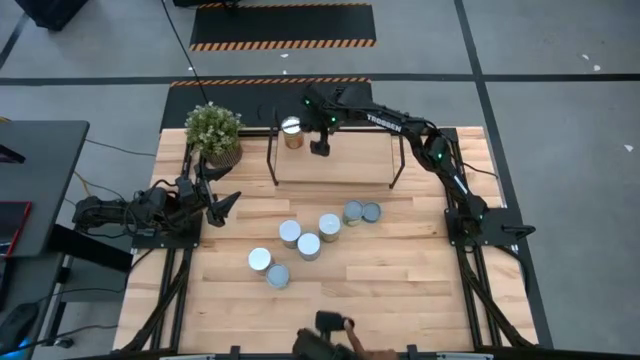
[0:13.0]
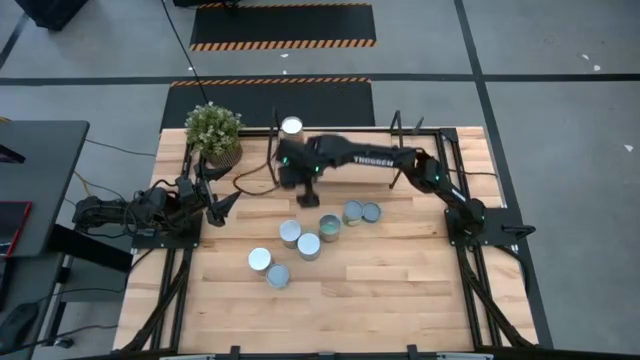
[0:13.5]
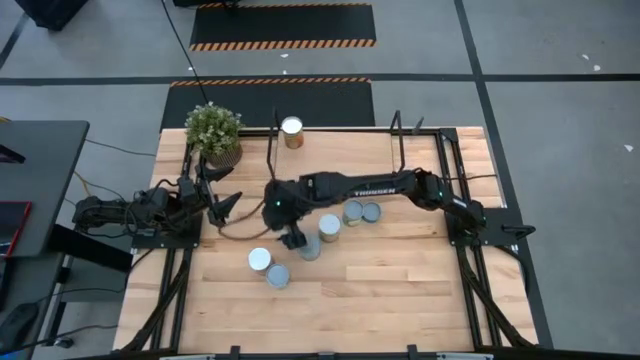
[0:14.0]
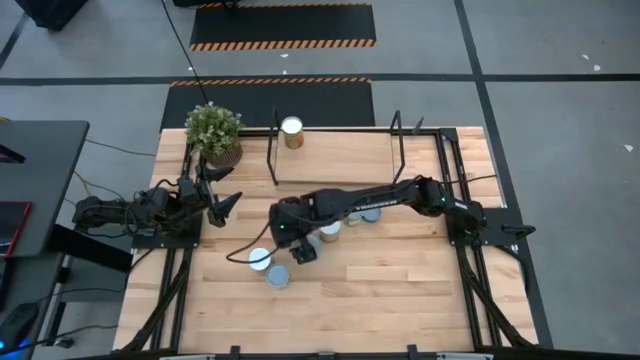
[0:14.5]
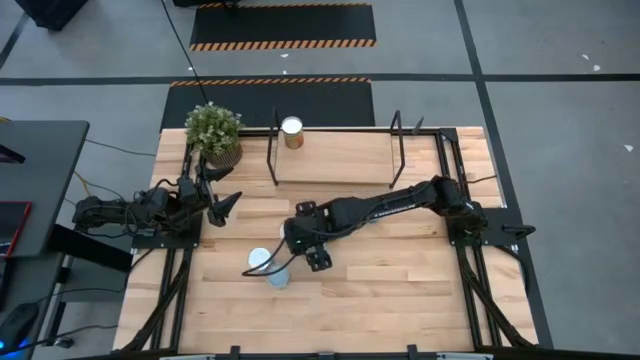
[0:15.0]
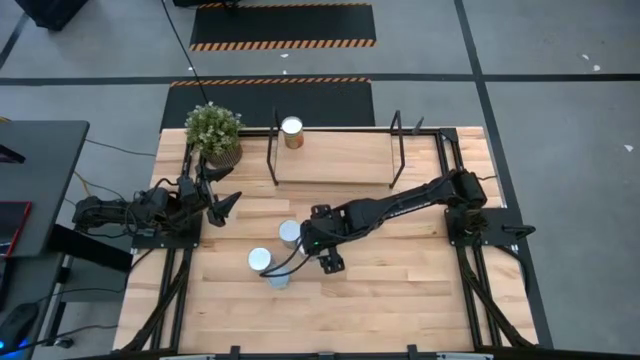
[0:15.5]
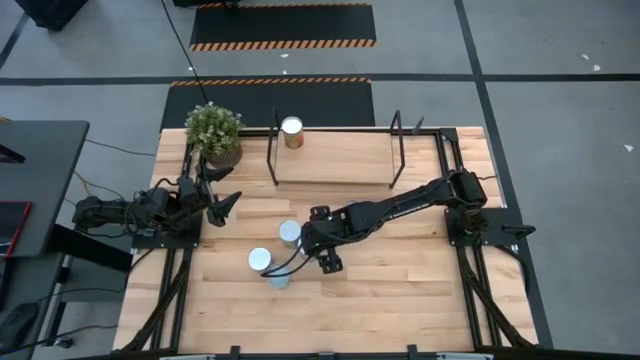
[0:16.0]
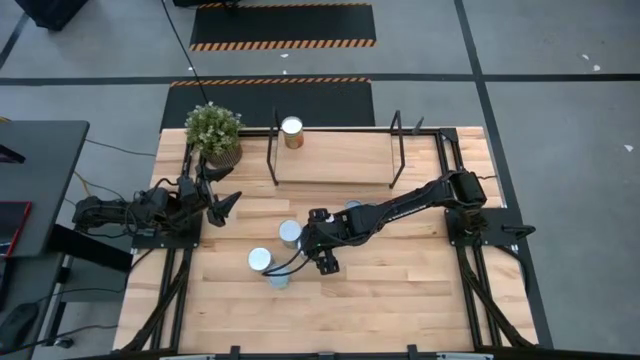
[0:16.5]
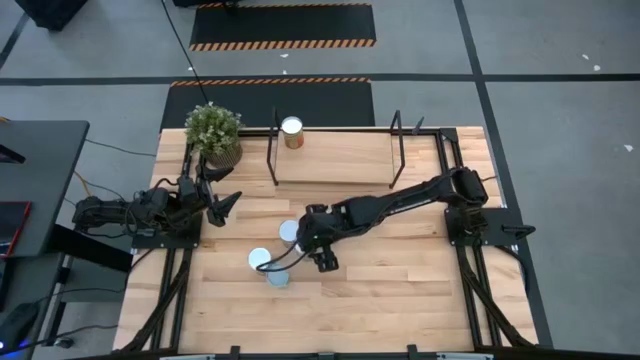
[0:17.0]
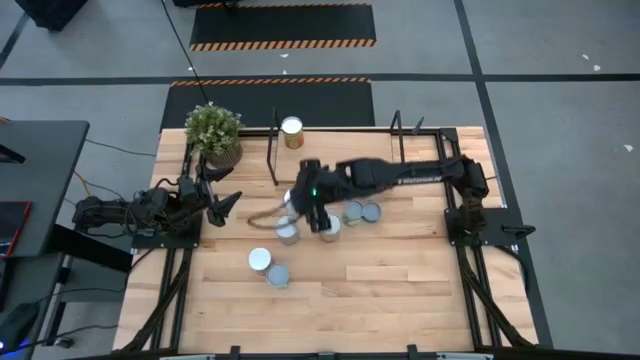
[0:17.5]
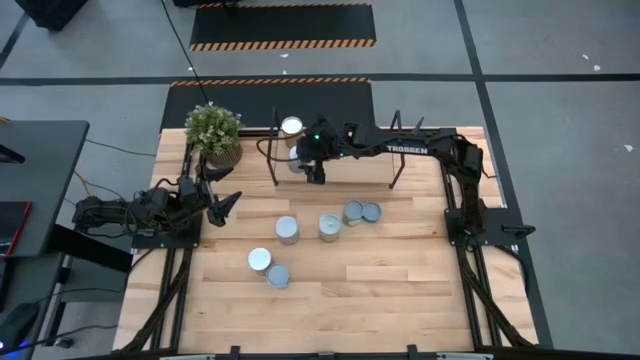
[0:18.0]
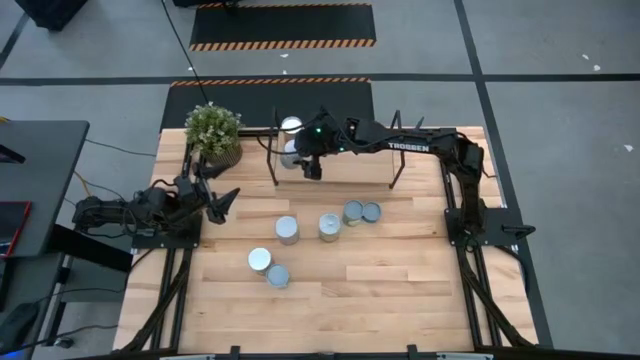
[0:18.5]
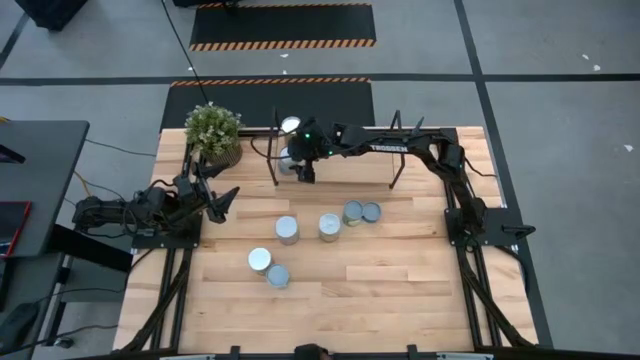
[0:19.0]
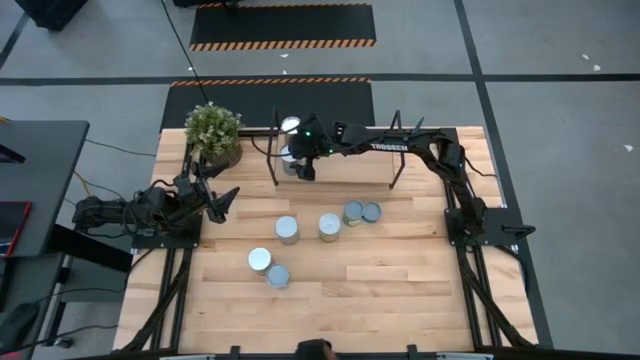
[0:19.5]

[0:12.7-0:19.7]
Task: Pick and place cans onto a shelf
Put the canned cherries on the shelf

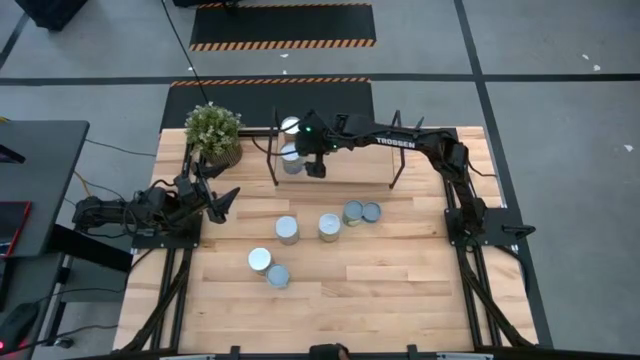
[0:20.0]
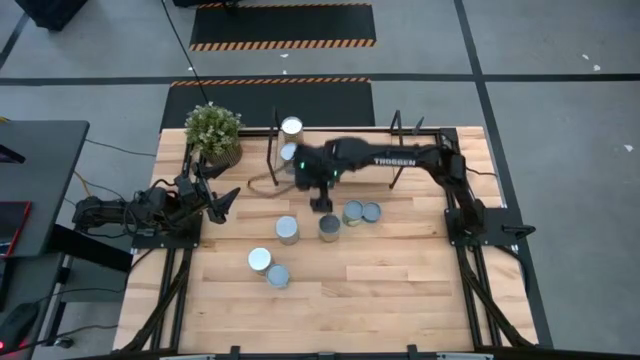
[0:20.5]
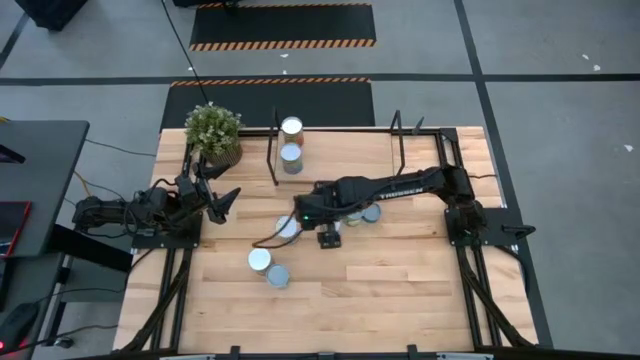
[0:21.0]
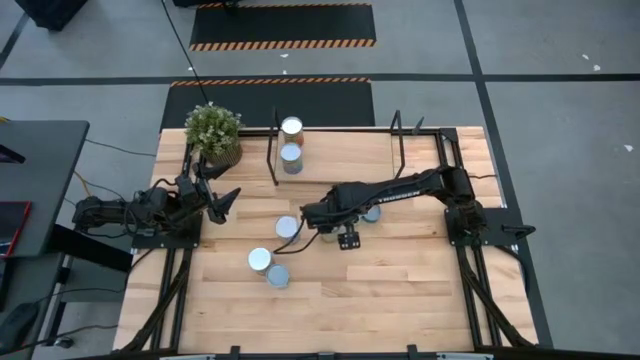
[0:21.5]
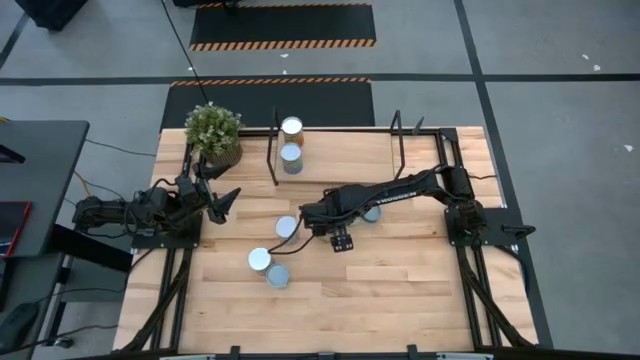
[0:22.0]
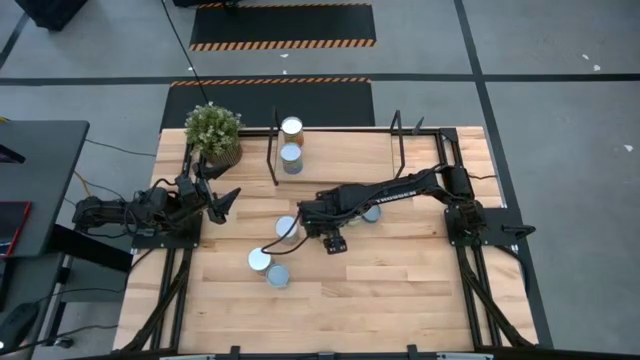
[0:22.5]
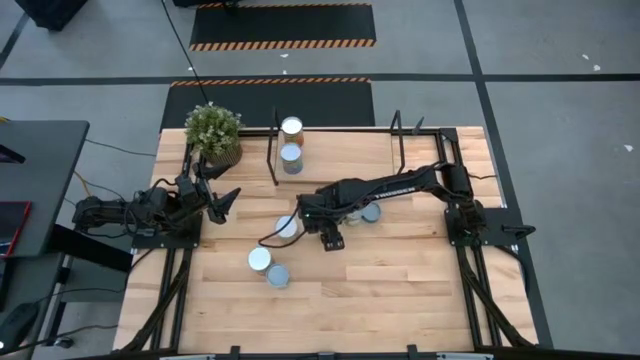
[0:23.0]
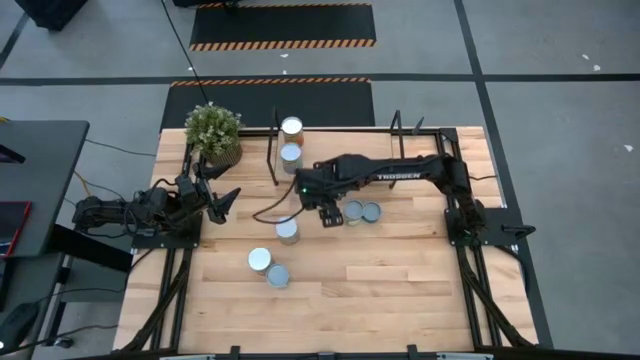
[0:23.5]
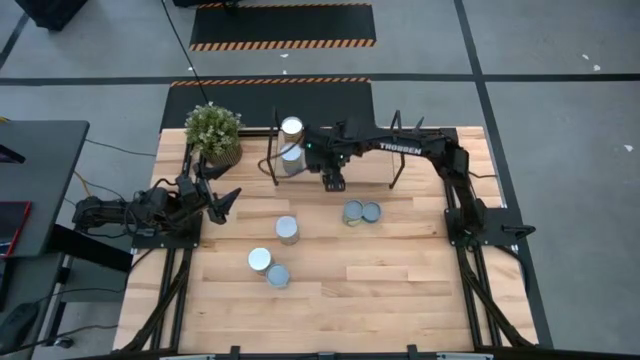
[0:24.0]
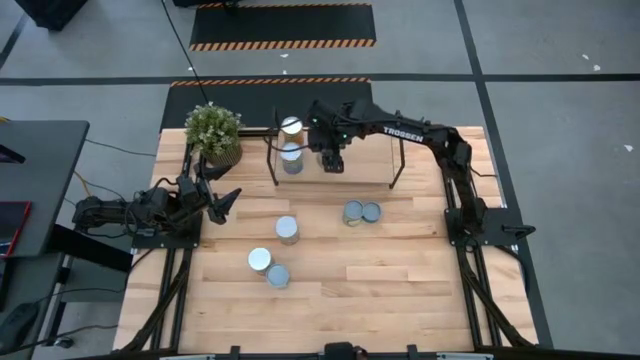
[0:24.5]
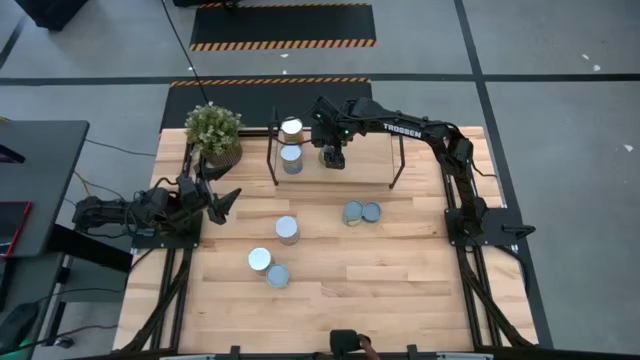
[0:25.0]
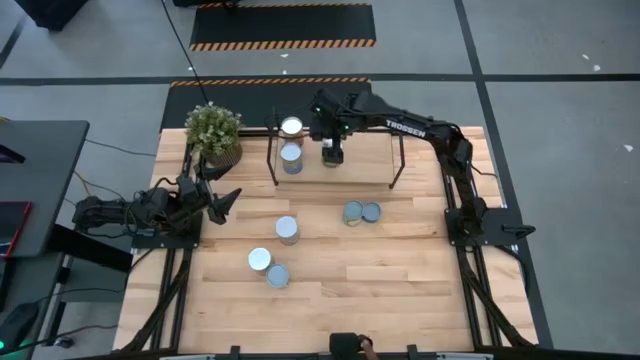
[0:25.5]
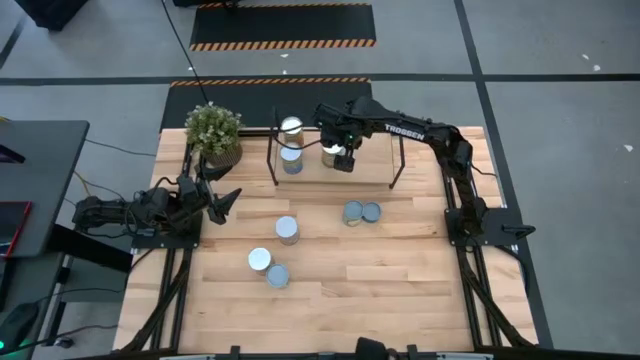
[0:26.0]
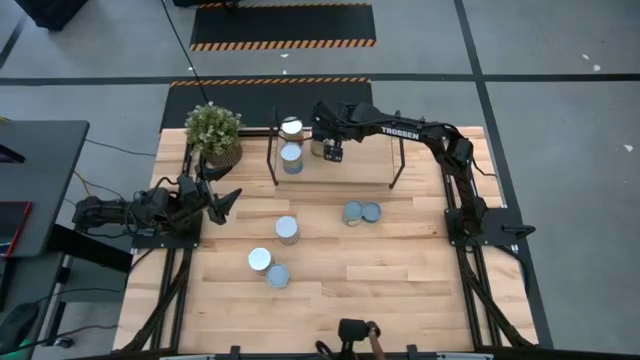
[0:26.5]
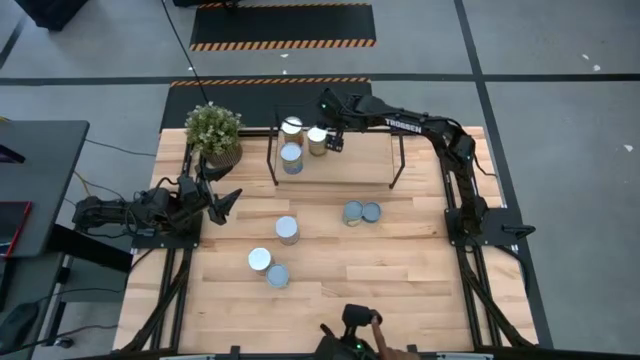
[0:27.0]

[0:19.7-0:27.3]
Put the canned oranges on the shelf

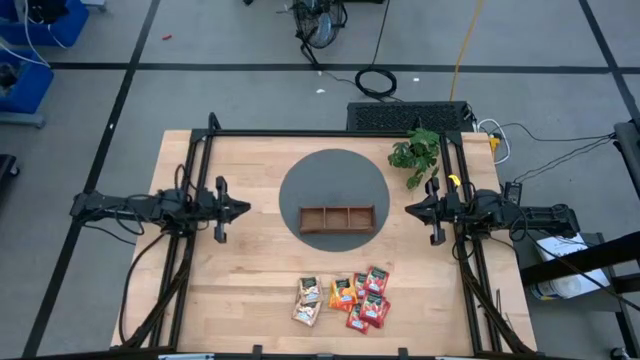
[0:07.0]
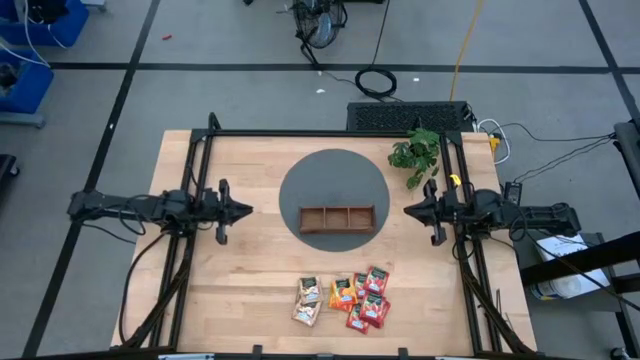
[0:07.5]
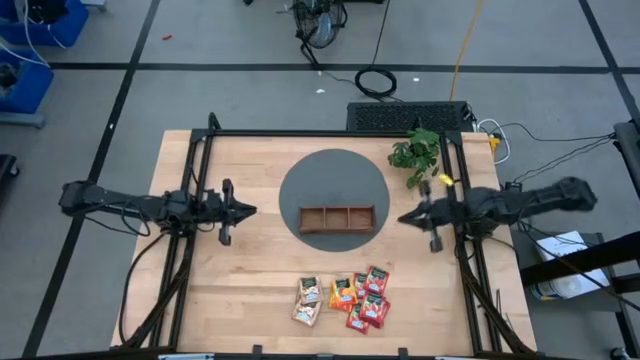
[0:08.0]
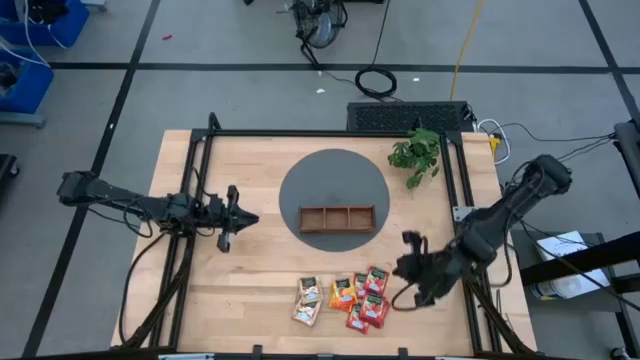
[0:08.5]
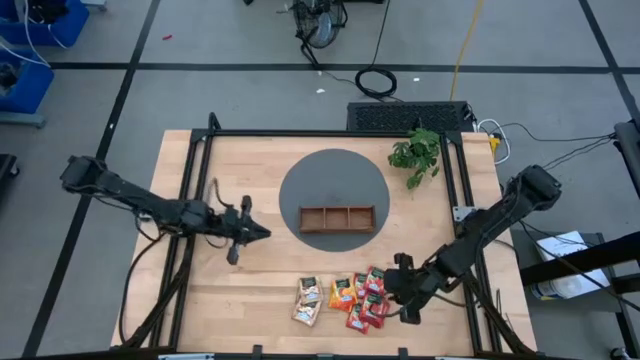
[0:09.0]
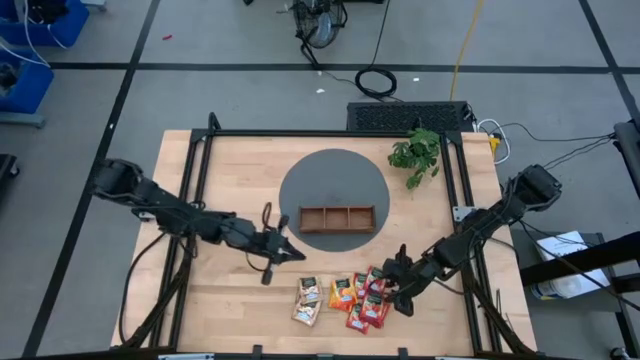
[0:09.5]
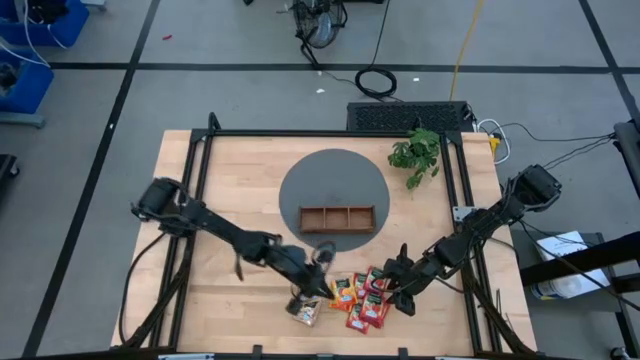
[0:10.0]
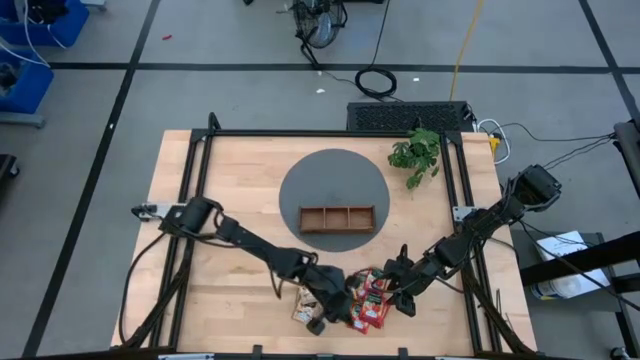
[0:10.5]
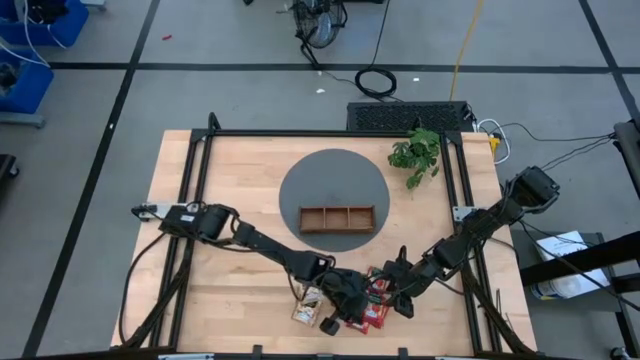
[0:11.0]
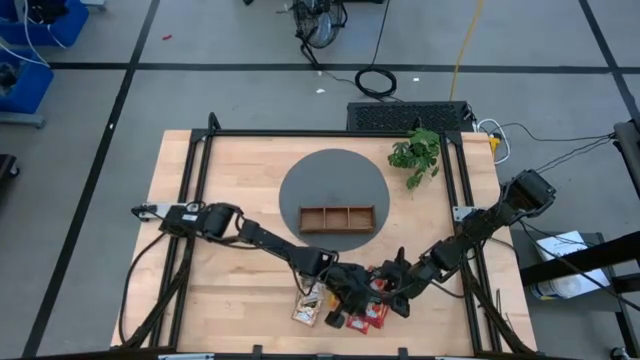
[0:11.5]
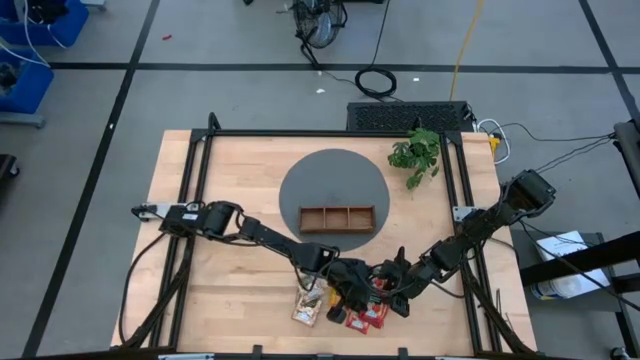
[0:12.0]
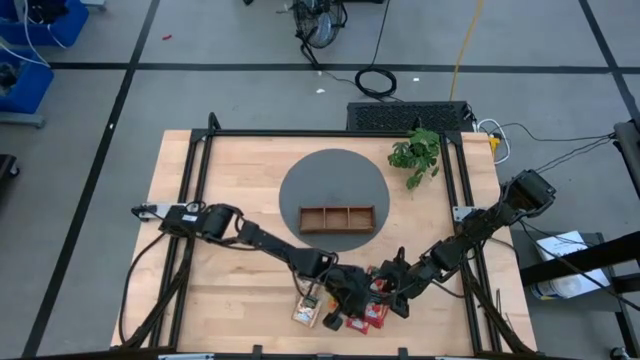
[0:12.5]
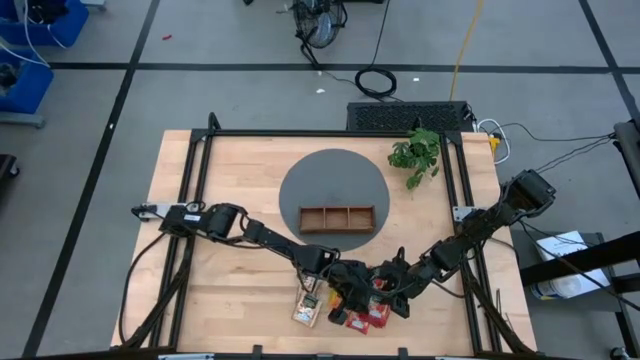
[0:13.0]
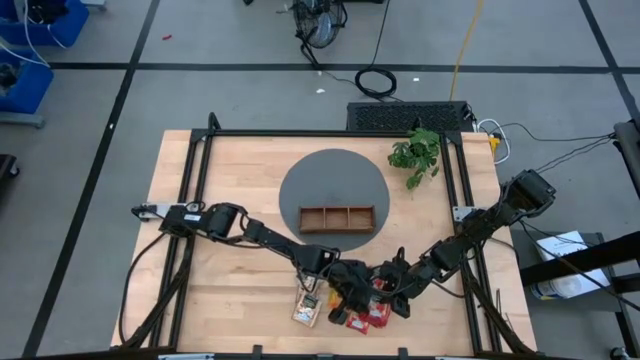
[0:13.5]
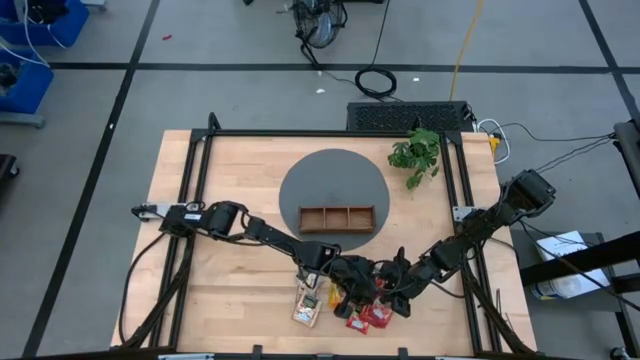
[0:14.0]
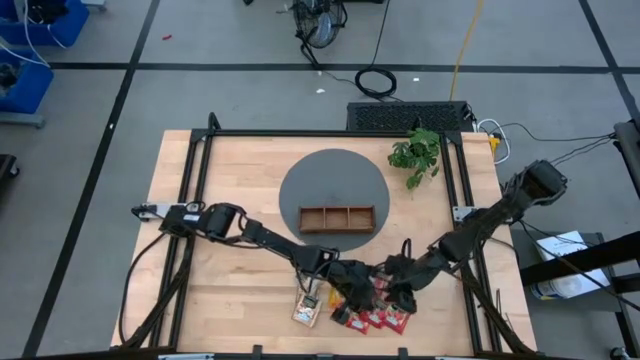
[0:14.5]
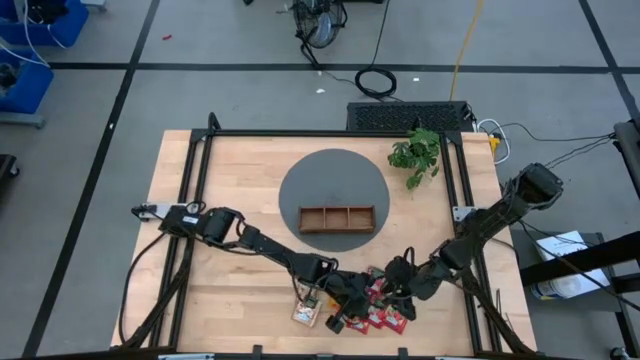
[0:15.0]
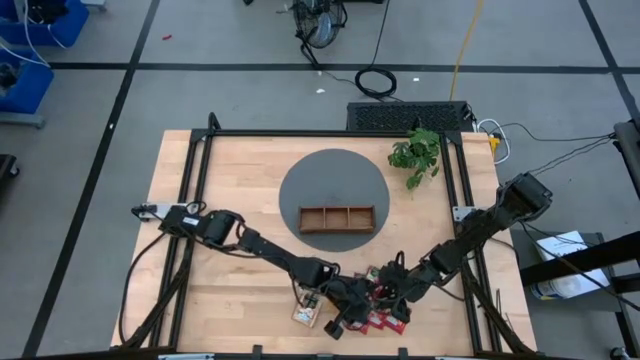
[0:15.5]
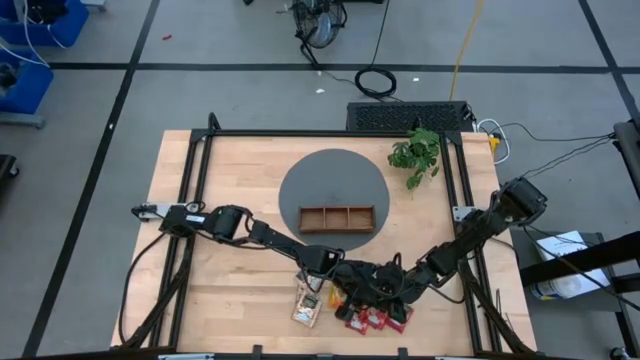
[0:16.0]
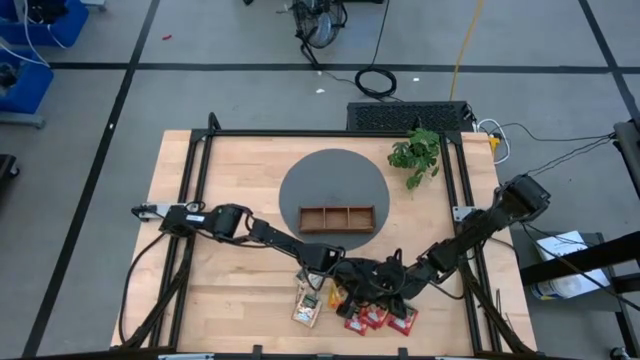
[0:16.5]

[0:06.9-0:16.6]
Task: Pick & Place Tea
Put the red tea bag into the right slot of the wooden organizer
